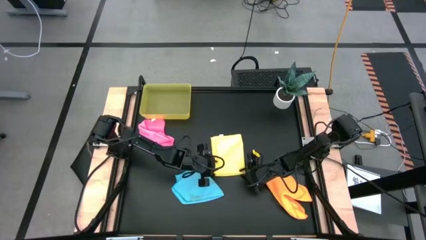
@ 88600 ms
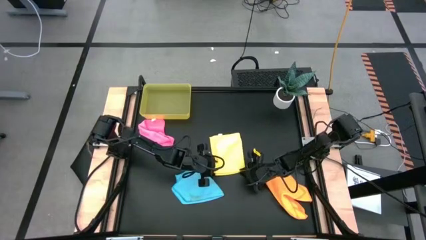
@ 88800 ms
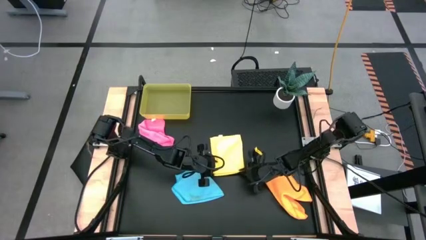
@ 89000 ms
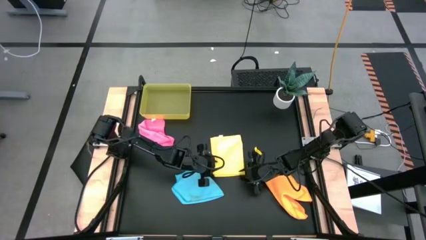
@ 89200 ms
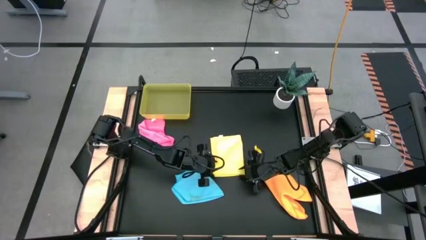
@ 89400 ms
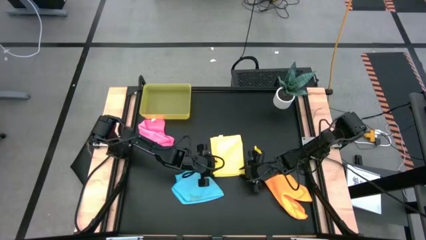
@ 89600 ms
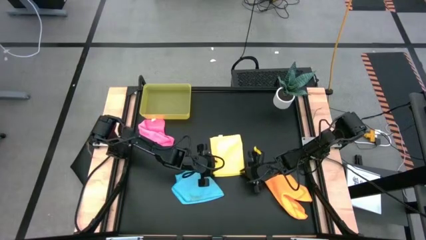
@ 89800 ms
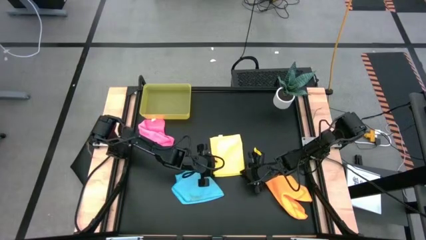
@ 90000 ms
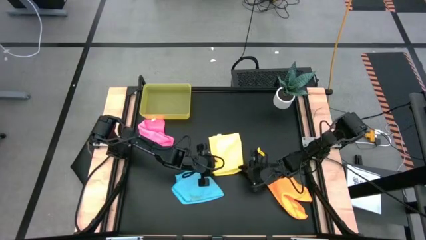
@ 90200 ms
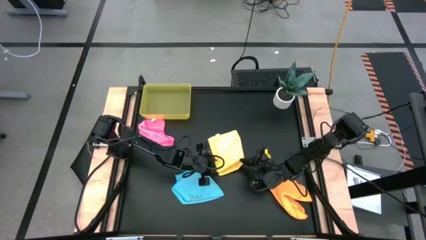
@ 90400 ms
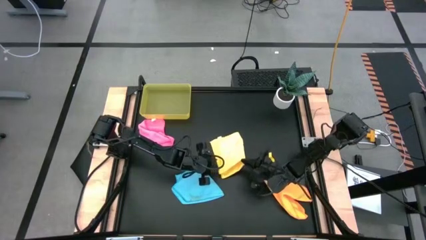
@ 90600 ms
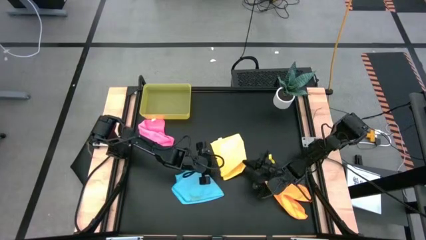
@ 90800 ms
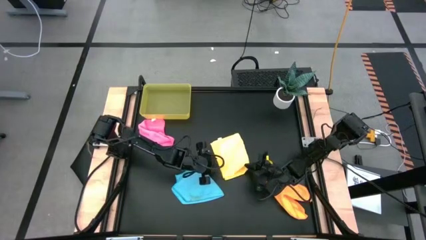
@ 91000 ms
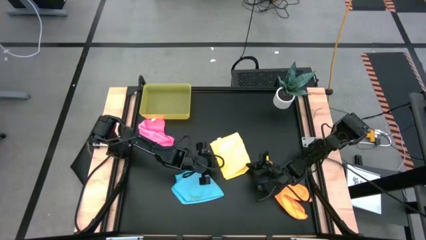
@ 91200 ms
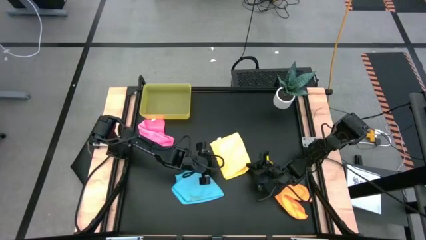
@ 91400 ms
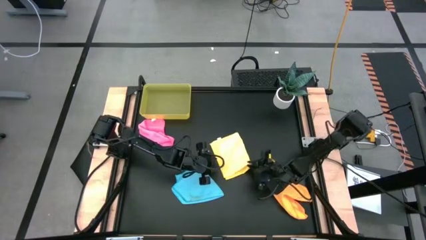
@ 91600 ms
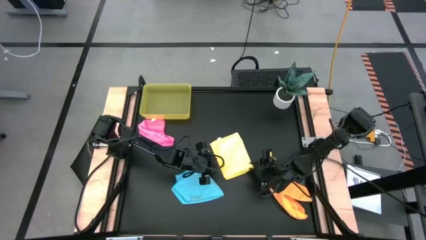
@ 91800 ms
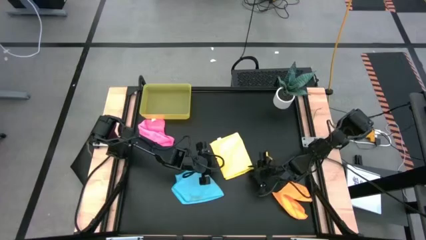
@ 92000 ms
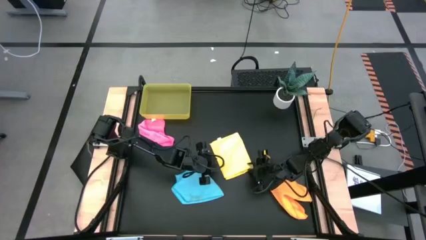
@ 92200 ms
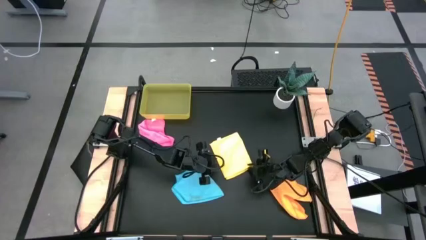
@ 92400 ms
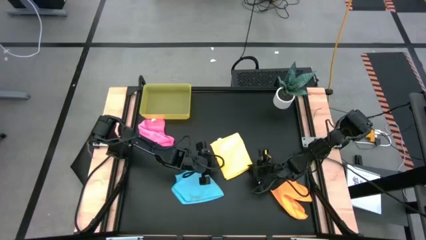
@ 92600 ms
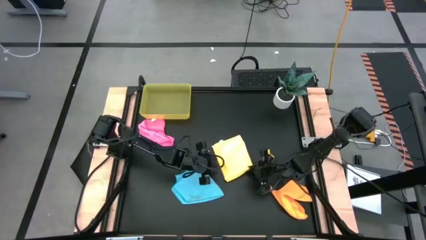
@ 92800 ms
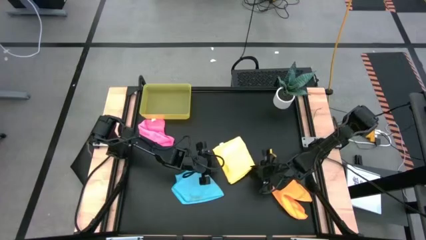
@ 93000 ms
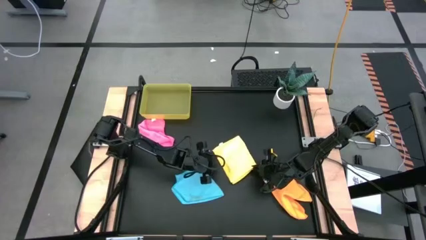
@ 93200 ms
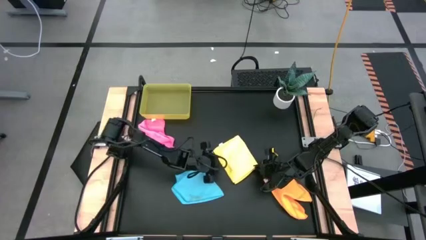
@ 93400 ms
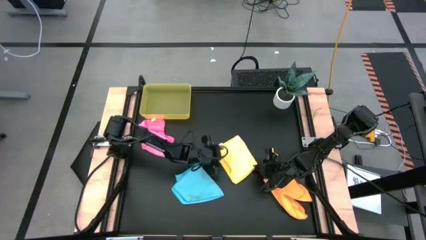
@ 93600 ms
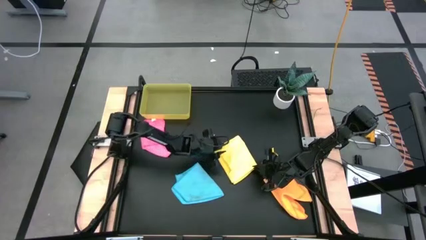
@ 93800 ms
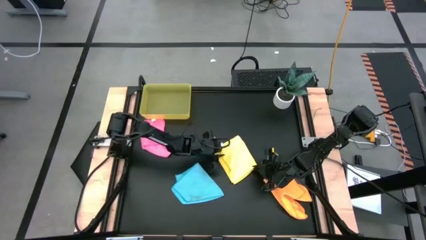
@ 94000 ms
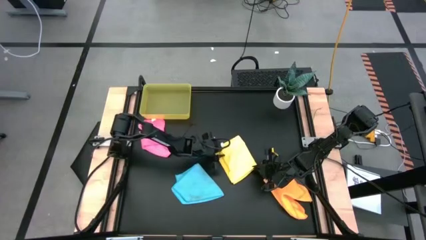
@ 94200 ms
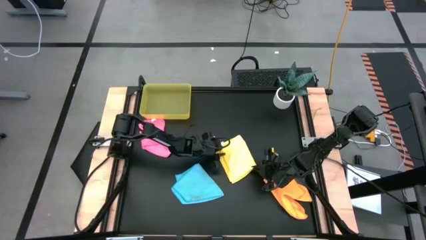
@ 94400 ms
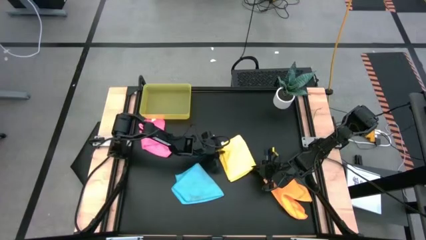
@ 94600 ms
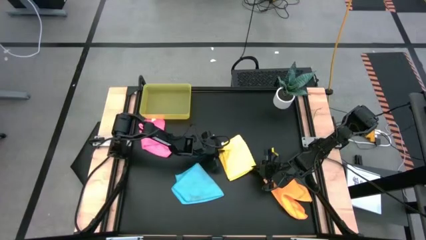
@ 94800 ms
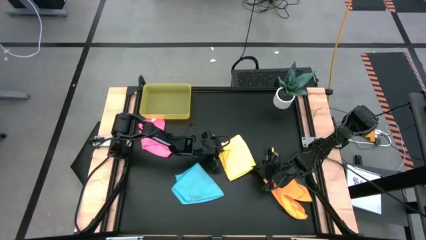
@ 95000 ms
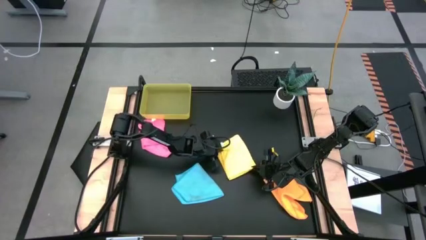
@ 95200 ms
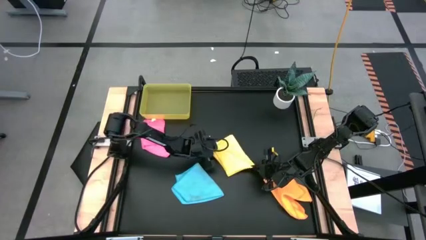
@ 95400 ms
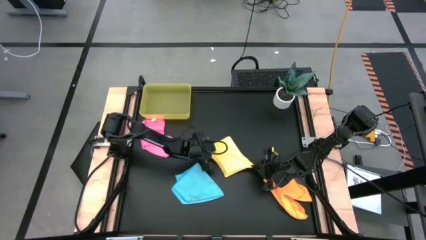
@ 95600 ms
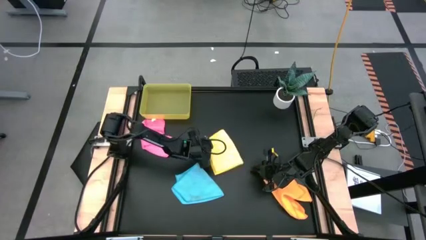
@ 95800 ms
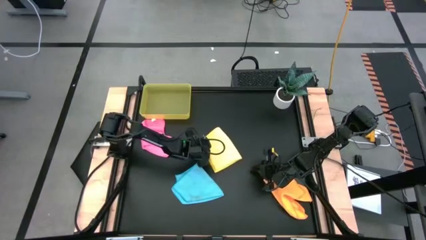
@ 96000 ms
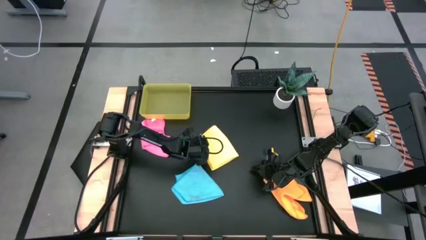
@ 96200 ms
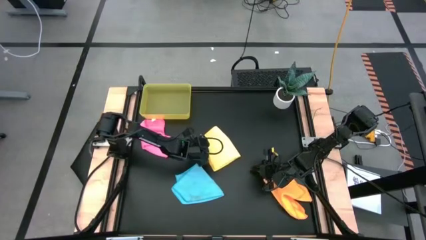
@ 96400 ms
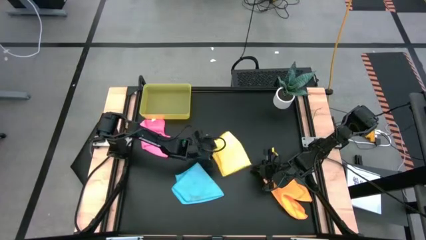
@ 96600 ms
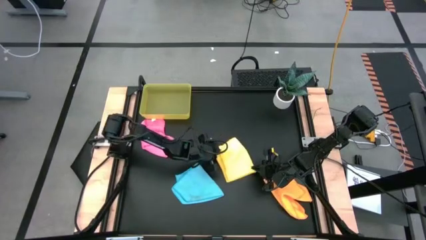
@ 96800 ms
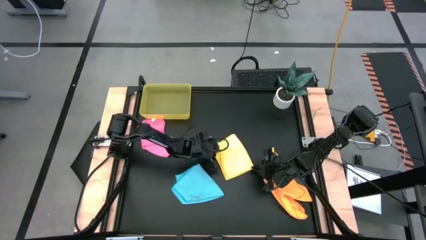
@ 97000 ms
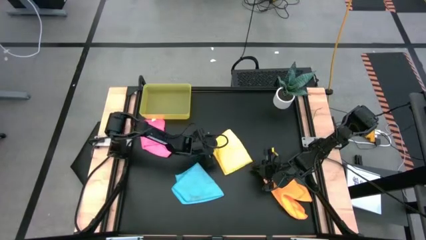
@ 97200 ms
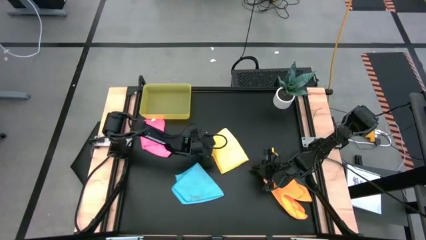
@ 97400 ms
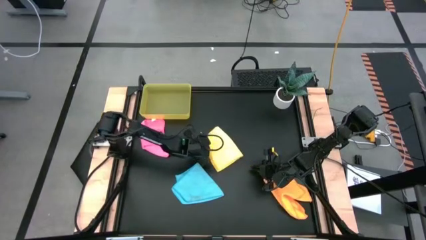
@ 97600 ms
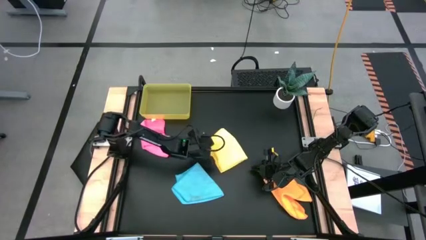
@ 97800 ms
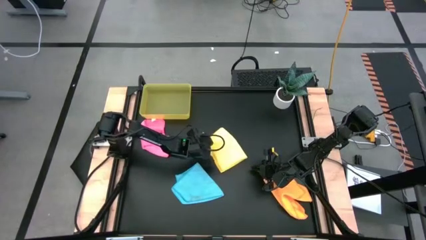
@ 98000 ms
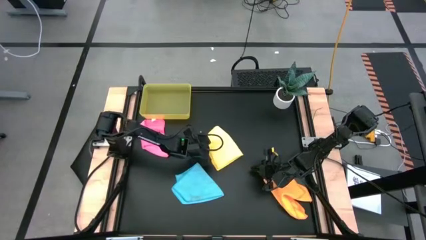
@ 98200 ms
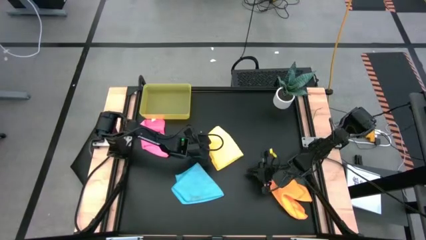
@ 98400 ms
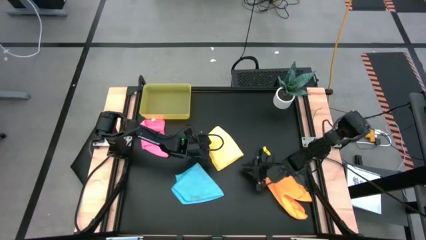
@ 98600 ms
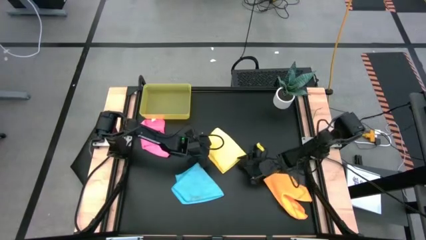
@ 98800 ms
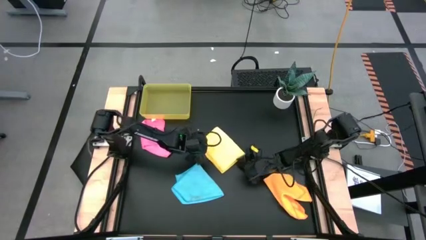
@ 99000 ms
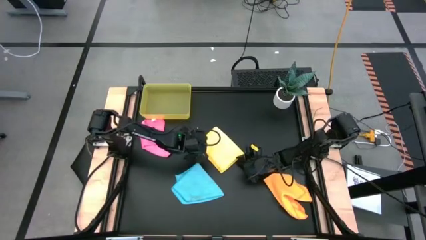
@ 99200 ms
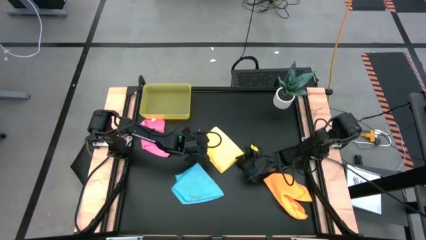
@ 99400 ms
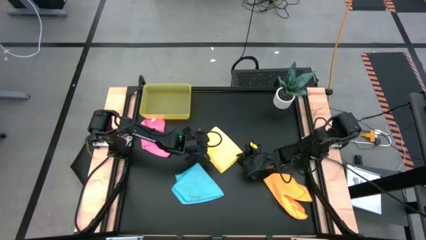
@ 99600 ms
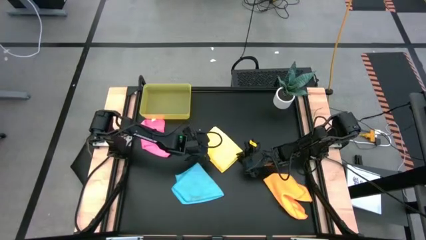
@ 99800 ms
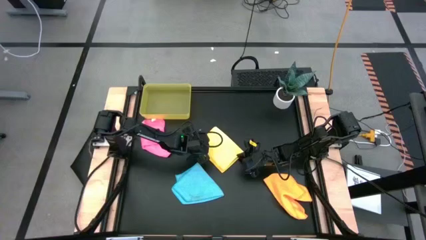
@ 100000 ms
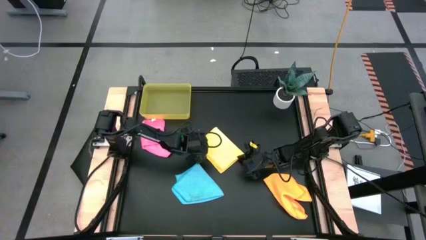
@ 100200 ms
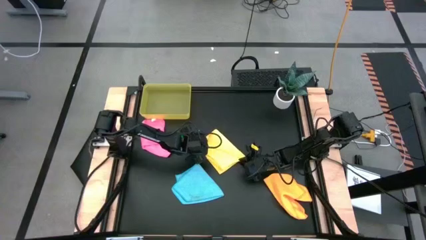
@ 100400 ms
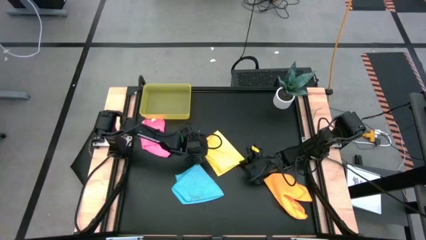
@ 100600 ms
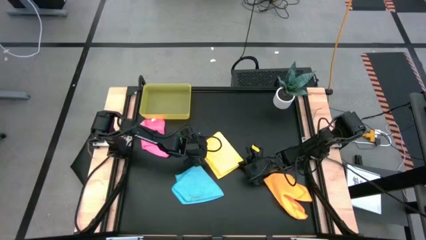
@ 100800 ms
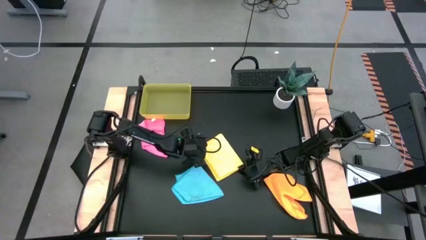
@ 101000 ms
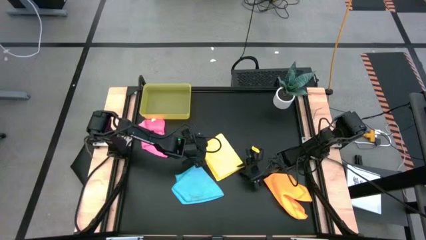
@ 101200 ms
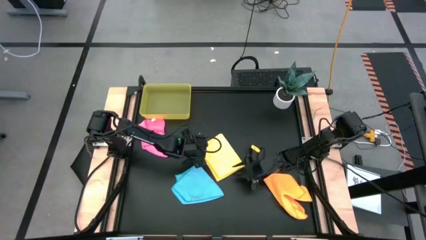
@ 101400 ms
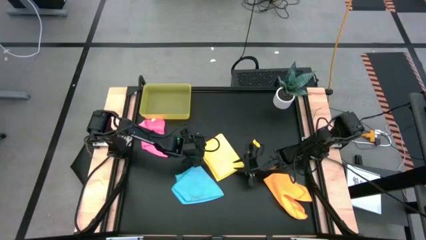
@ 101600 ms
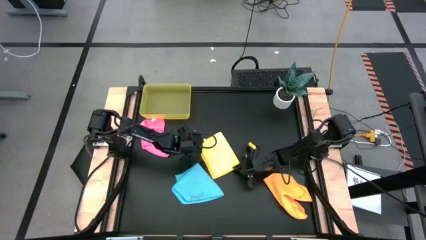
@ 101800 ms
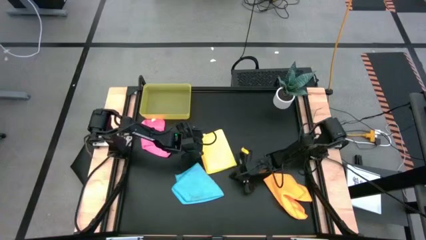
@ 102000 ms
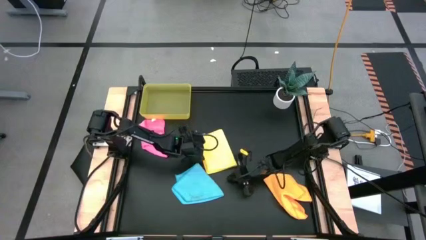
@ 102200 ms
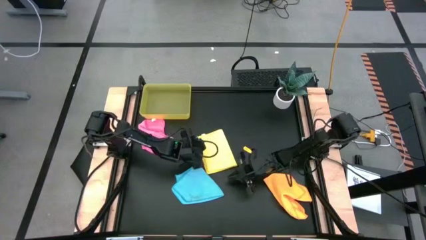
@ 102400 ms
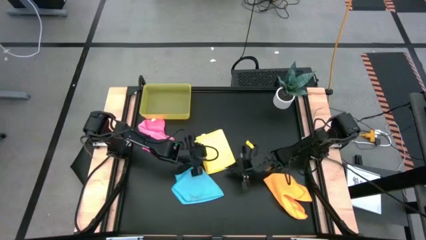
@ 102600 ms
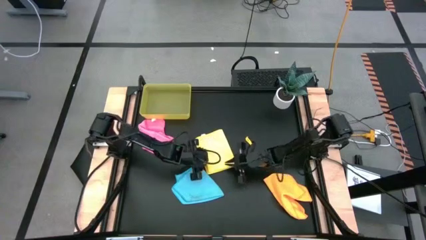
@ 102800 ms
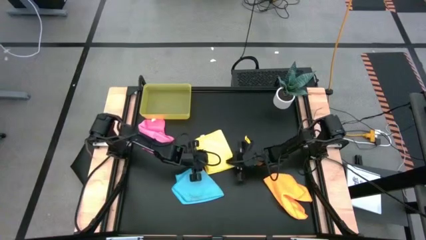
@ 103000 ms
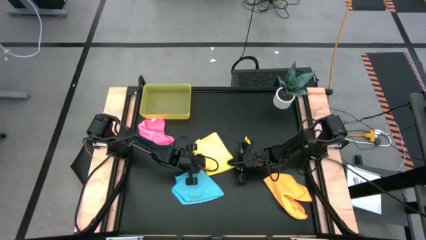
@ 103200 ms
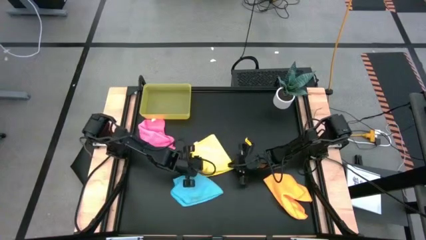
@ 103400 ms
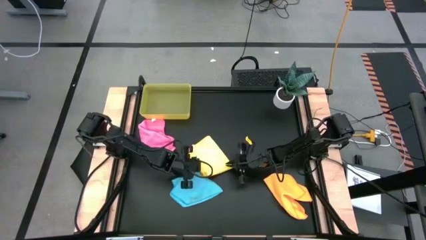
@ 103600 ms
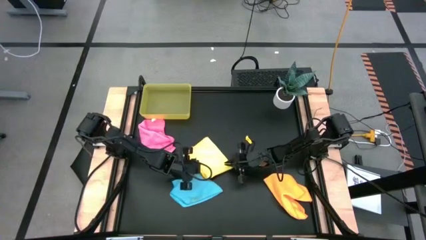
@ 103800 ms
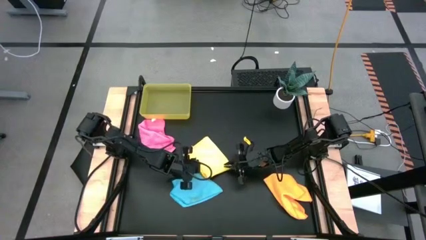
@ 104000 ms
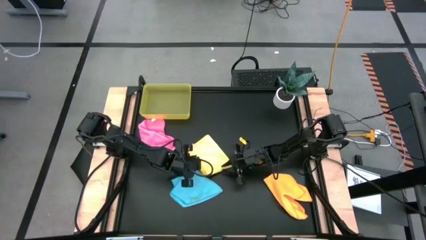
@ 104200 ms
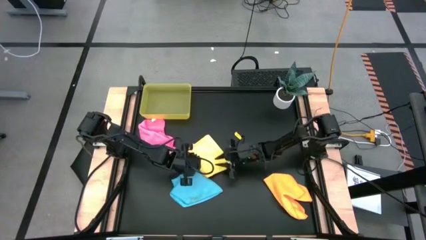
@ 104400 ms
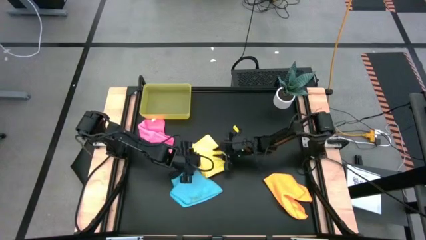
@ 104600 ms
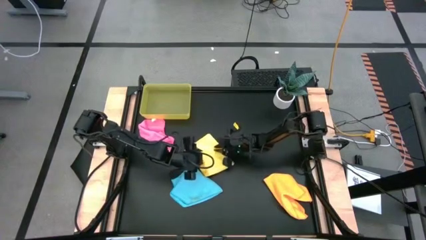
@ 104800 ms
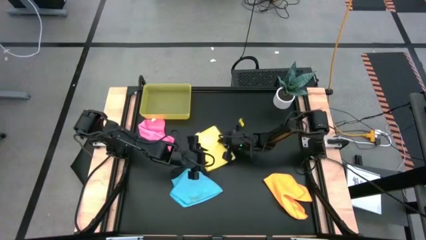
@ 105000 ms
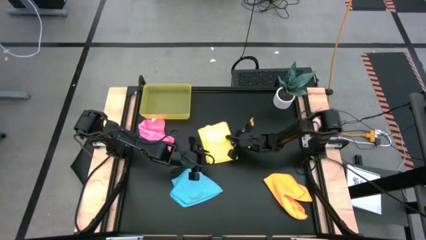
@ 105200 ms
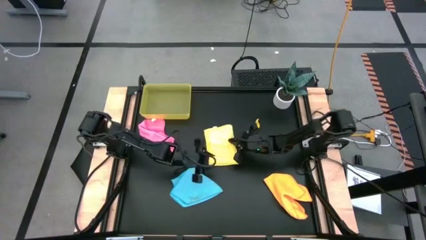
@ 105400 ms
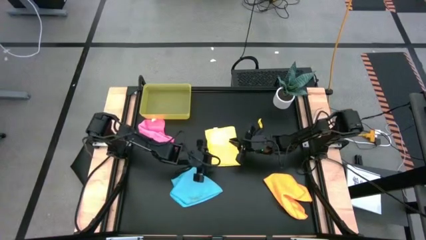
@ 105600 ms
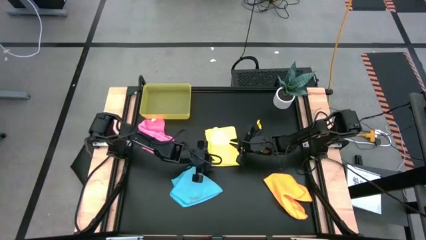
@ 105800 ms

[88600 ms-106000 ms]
Task: Fold microfiber towels
Fold the yellow microfiber cloth
